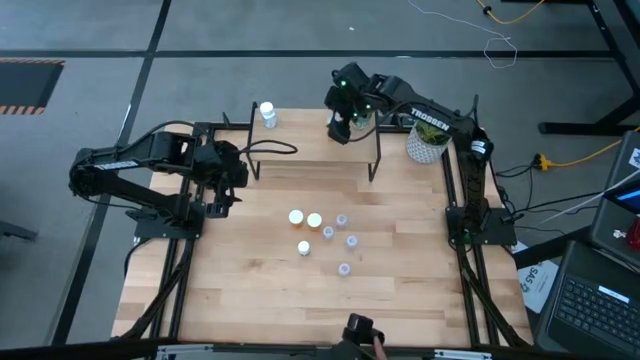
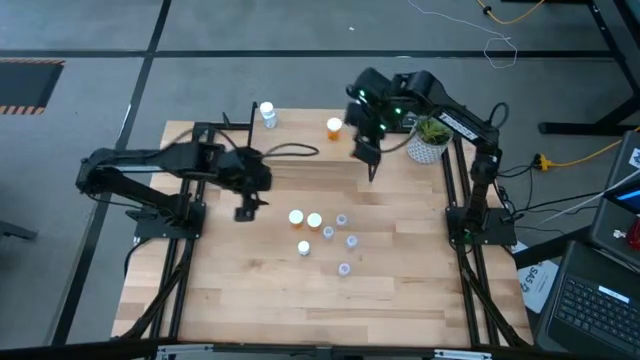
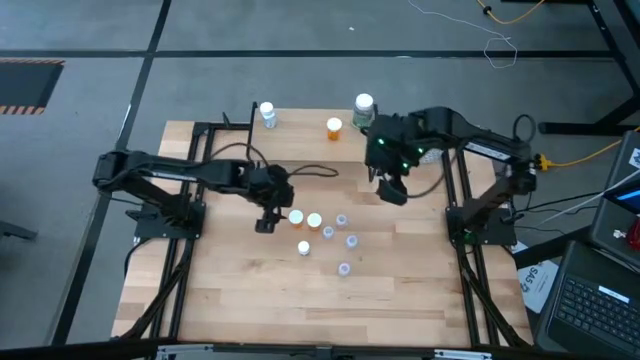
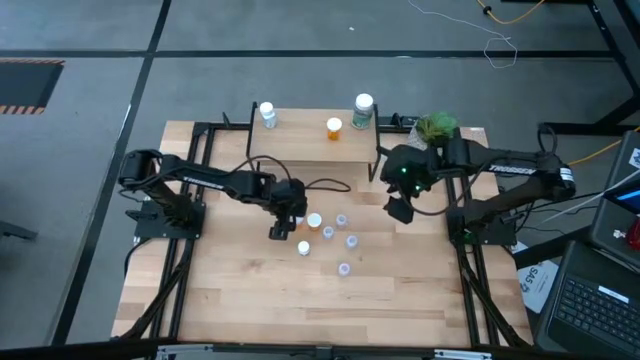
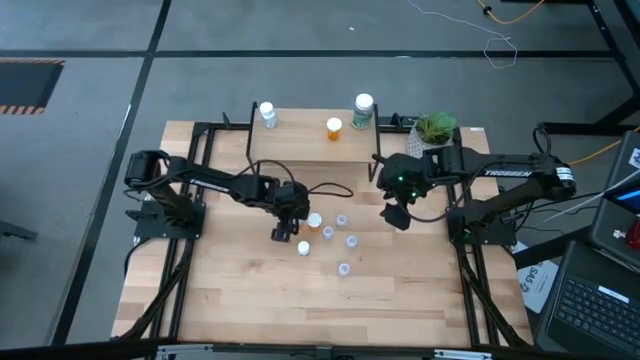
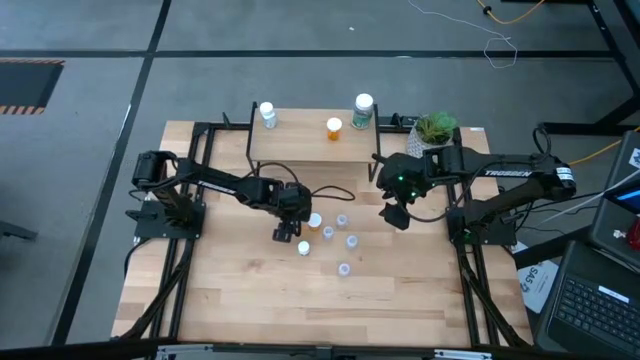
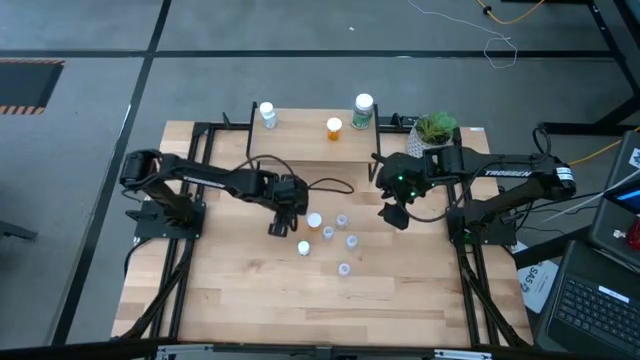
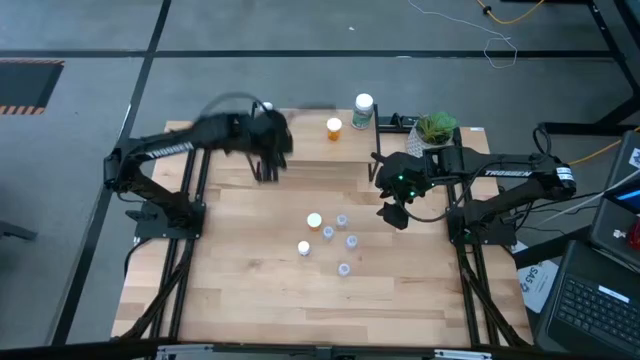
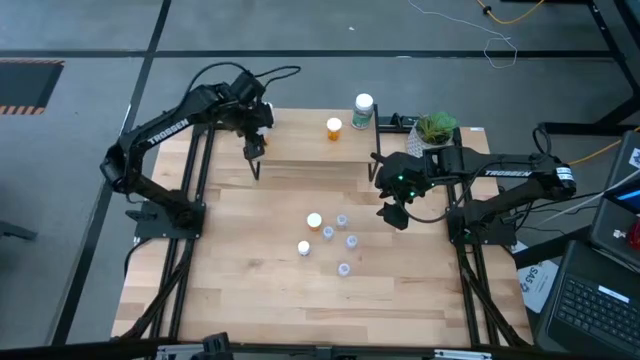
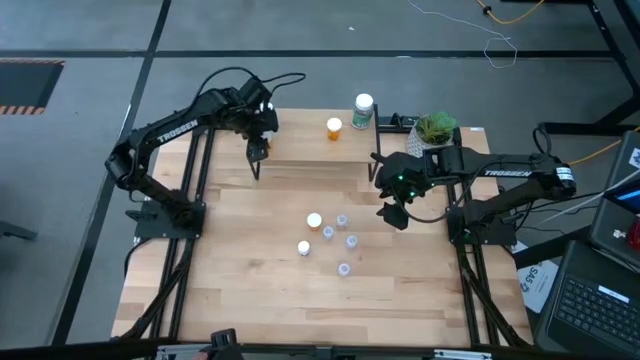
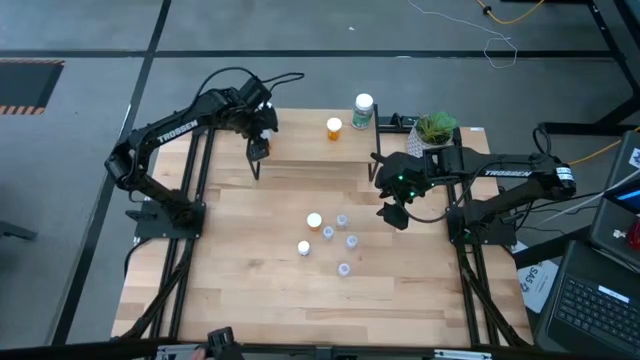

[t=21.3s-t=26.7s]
Task: Pick and place medicine bottles onto shelf by color
Put the left orange medicine bottle on the shelf

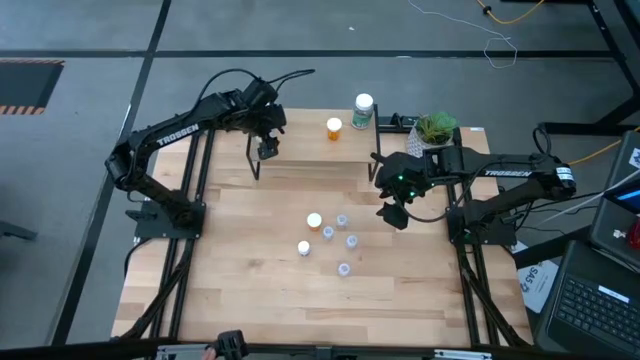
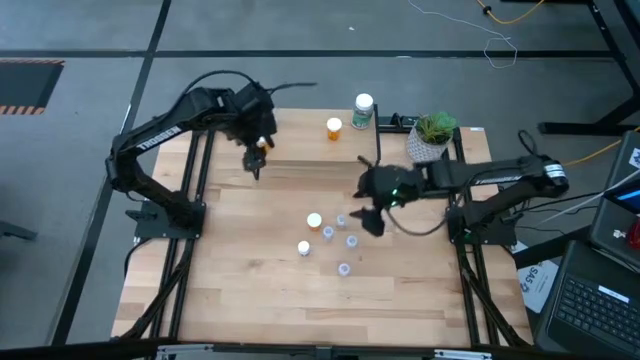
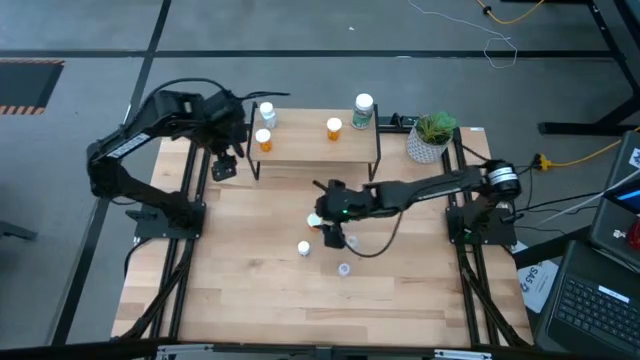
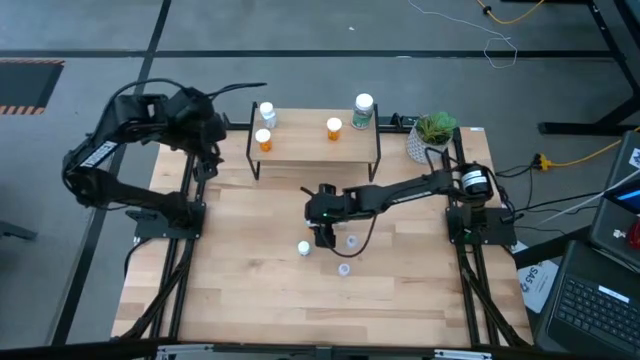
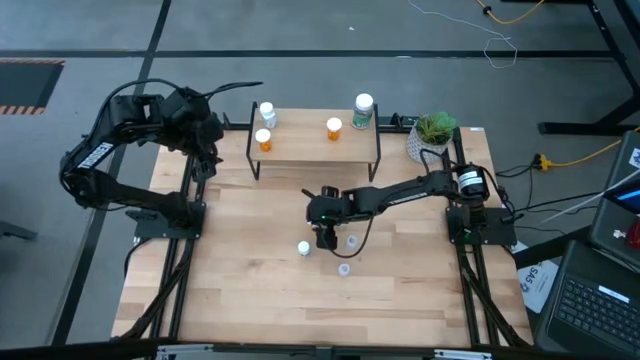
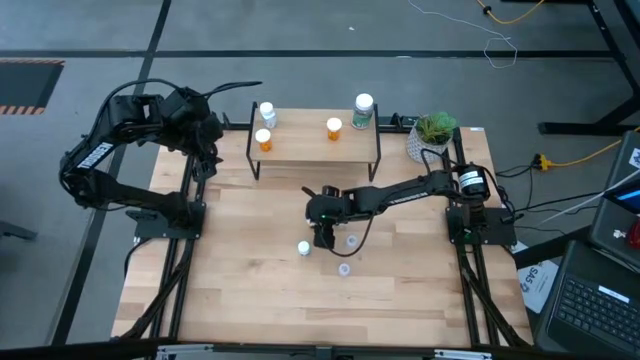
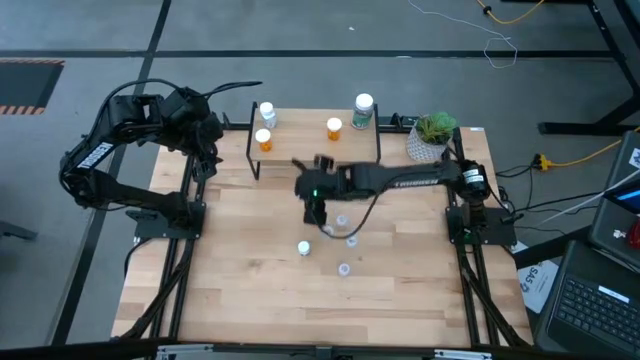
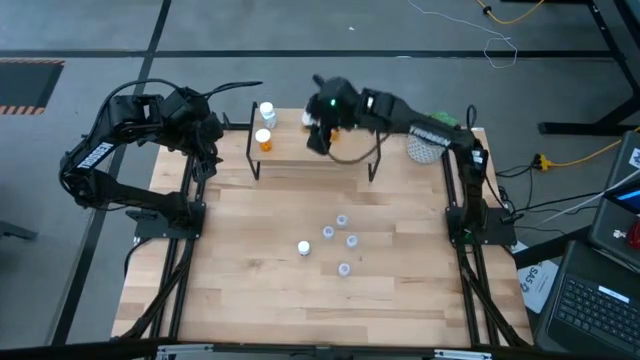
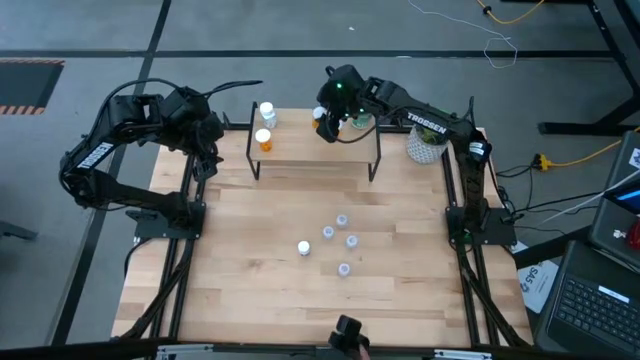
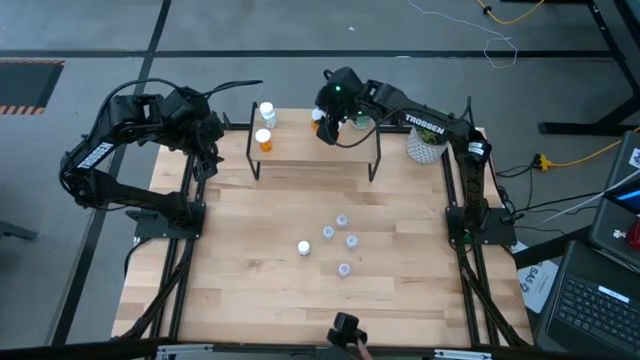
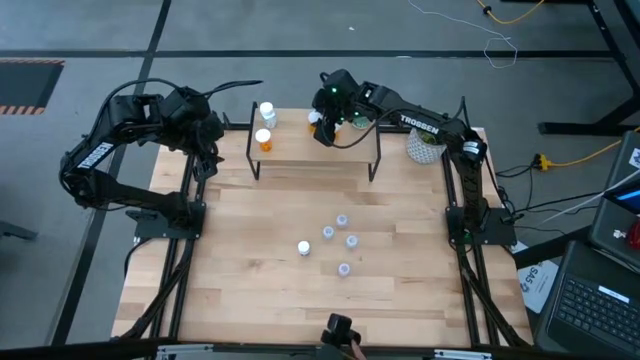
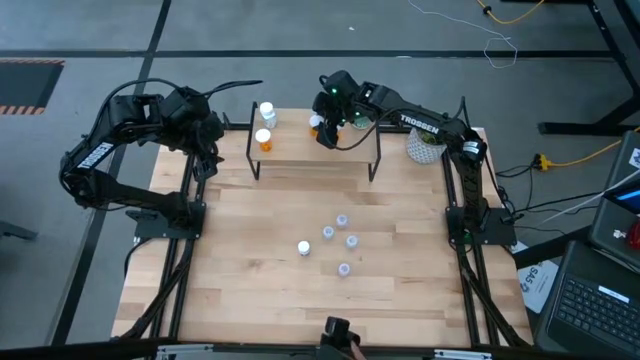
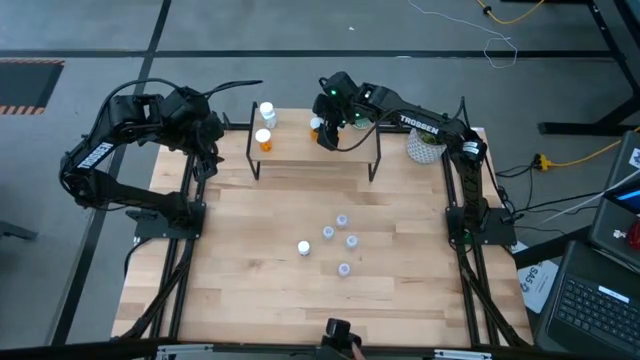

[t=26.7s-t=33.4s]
Put the orange medicine bottle on the shelf

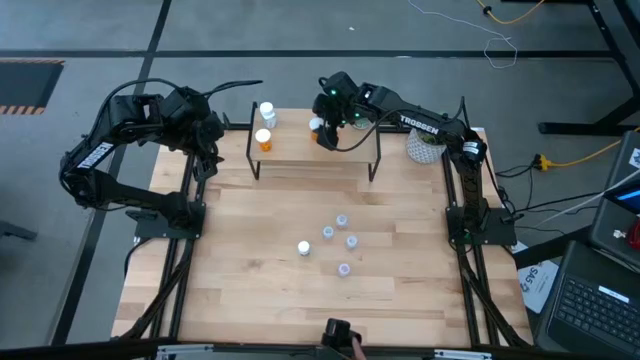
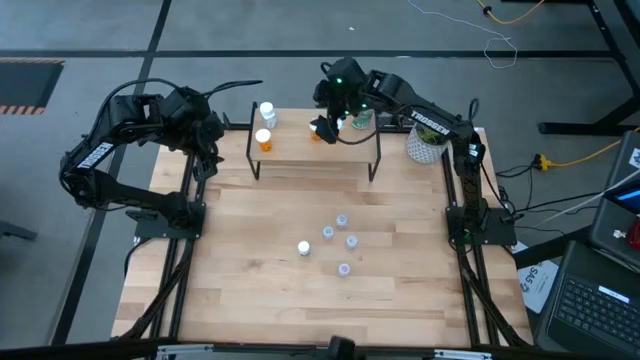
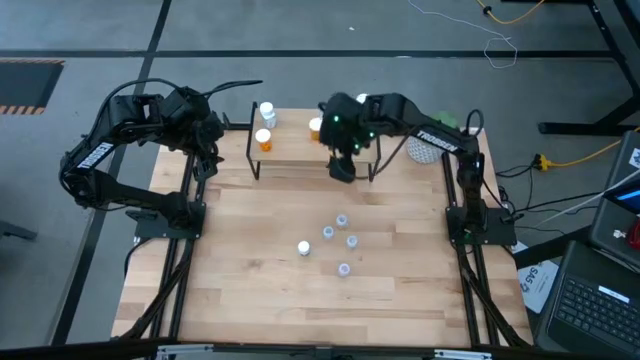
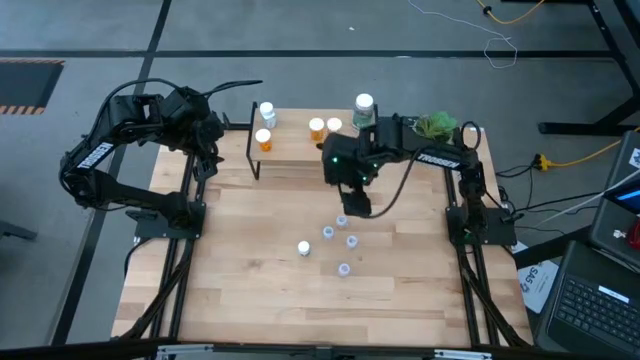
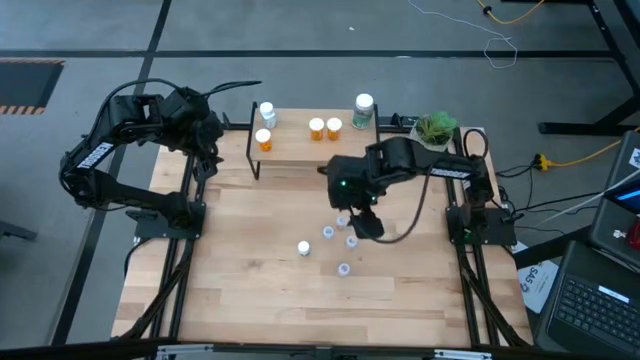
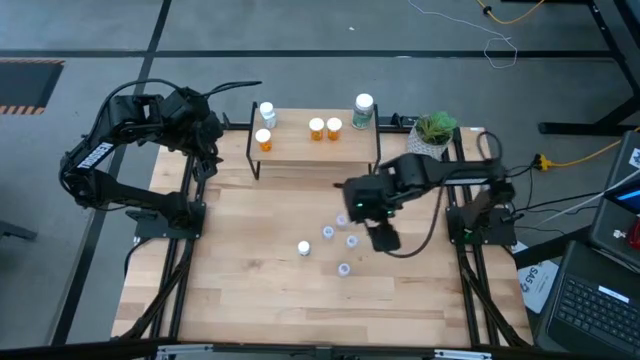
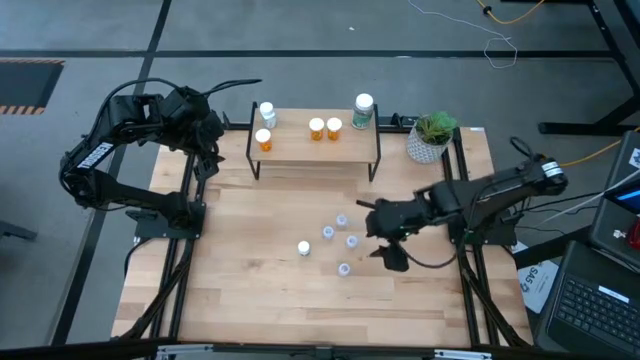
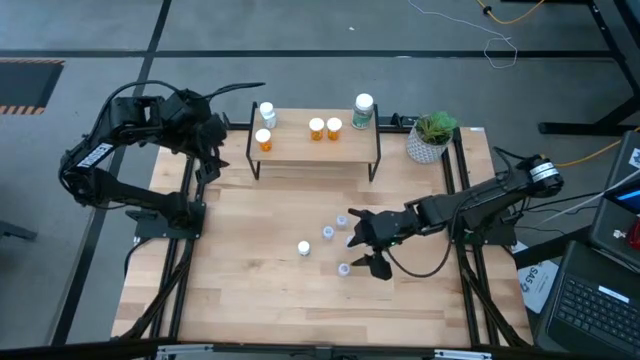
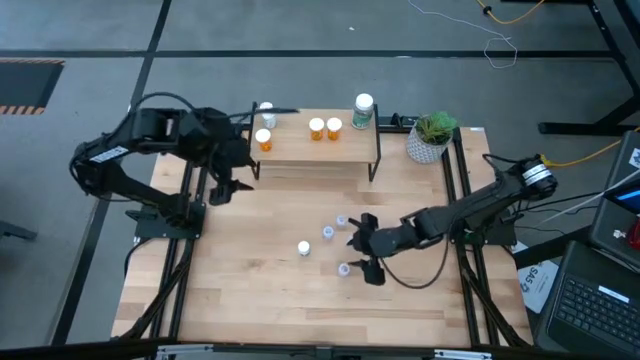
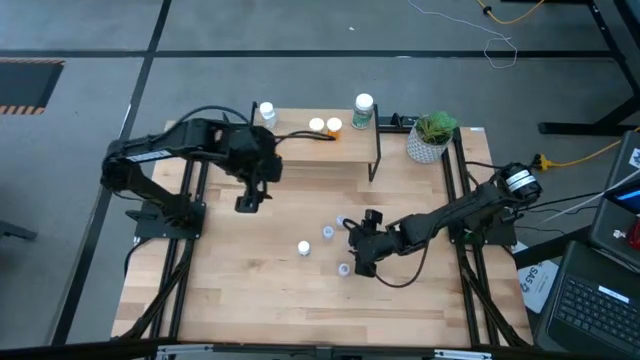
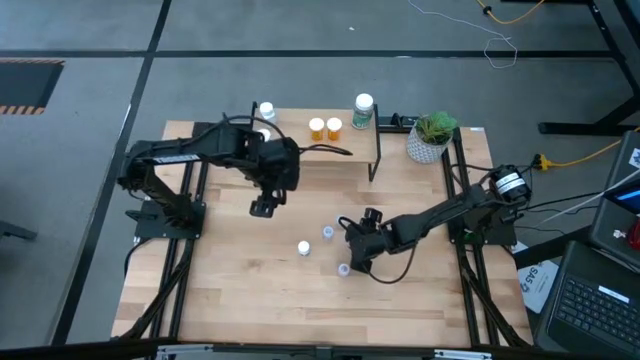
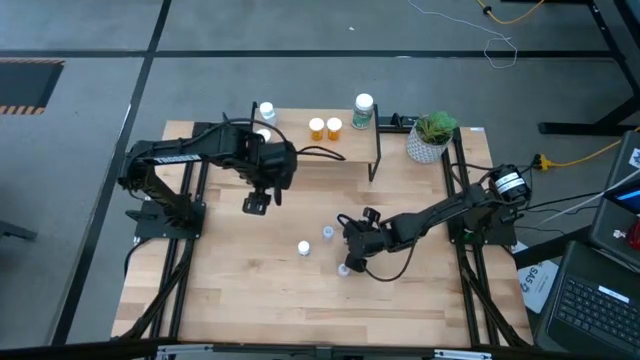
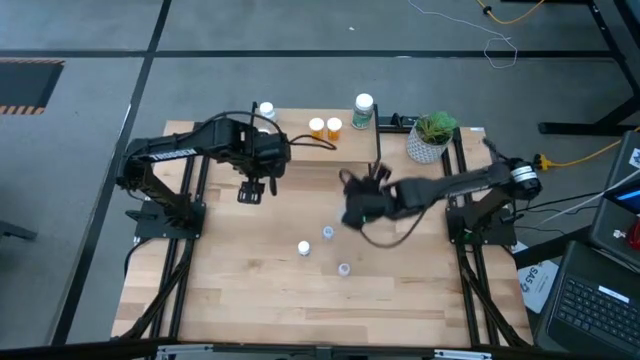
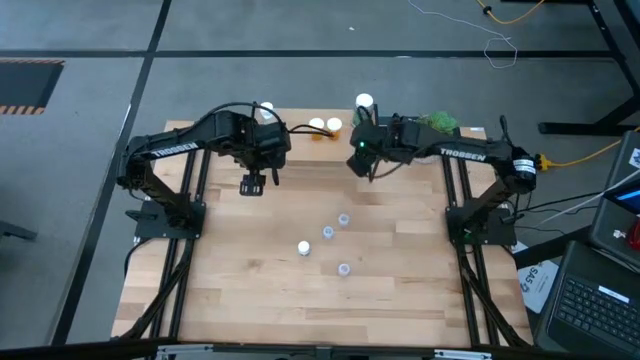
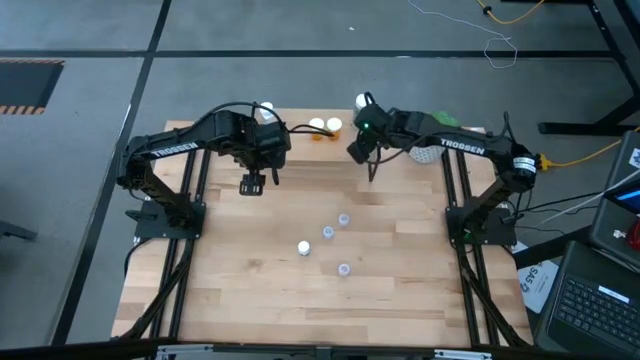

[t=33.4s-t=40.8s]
Put the transparent medicine bottle on the shelf

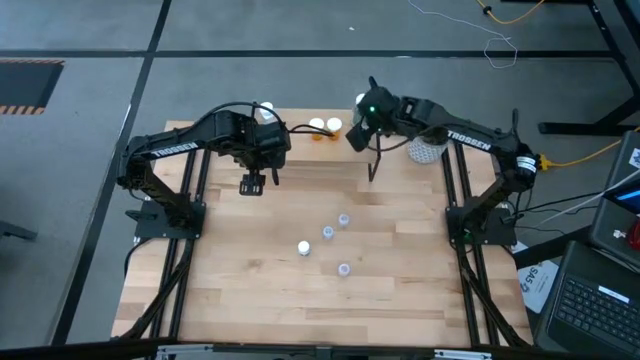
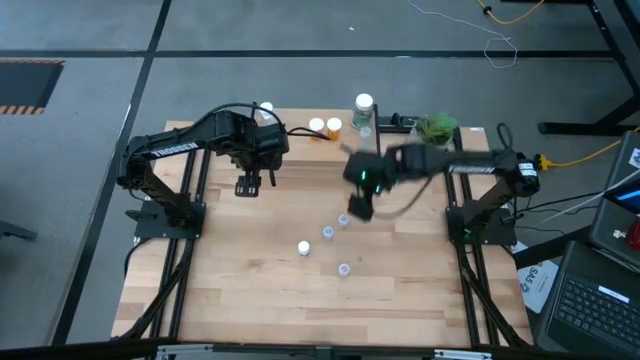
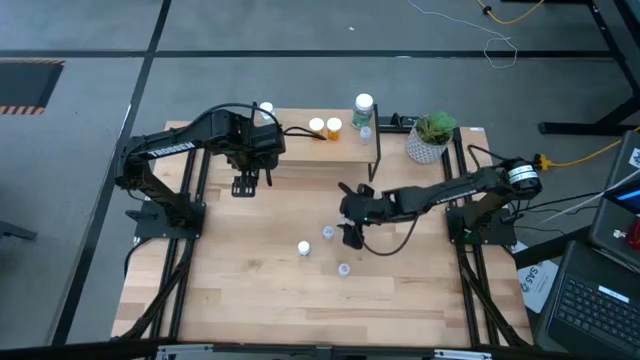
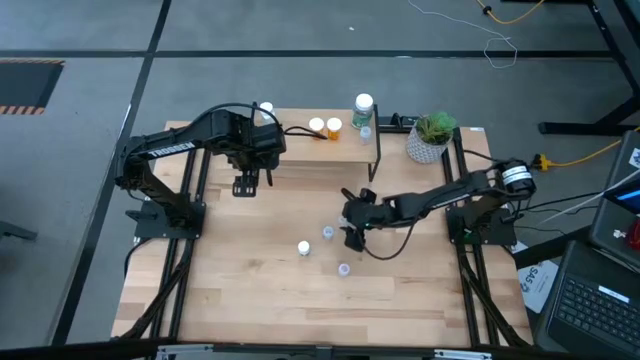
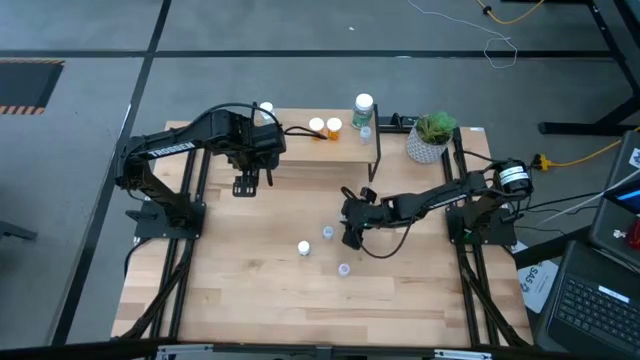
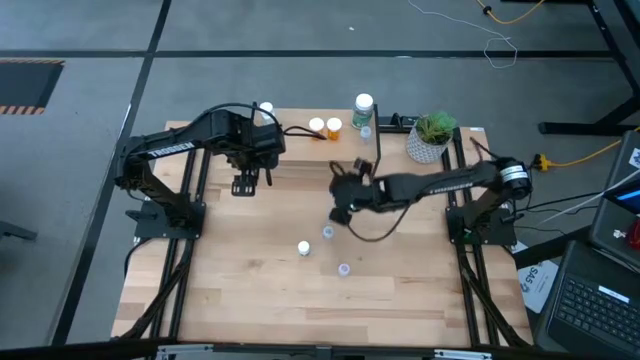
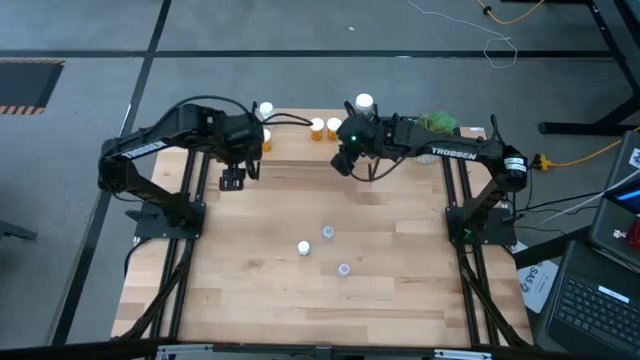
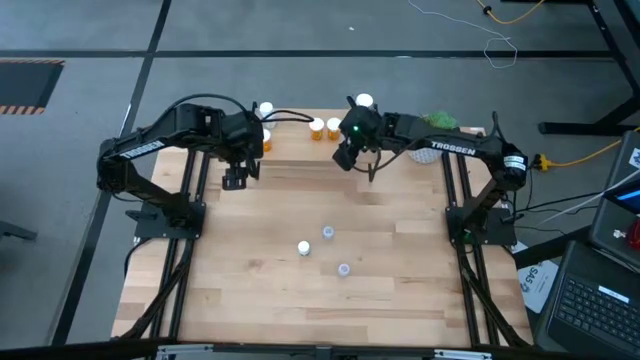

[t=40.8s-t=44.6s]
Put the transparent medicine bottle on the shelf
